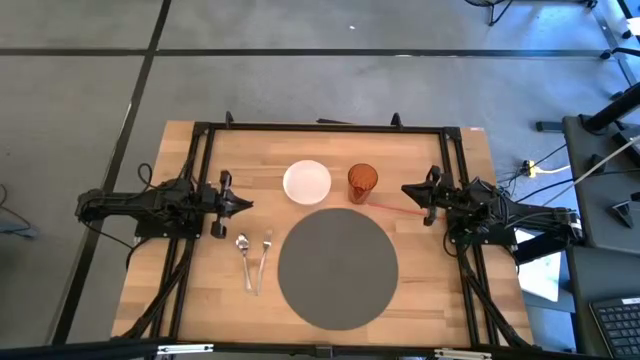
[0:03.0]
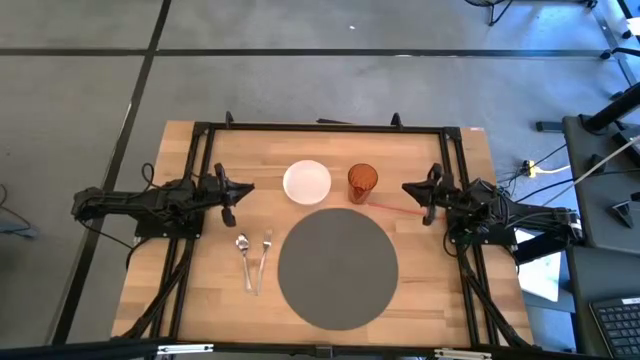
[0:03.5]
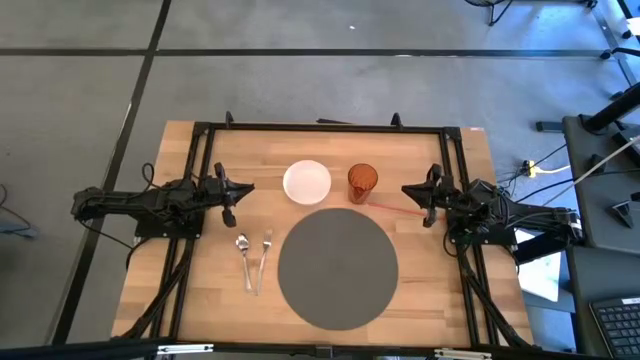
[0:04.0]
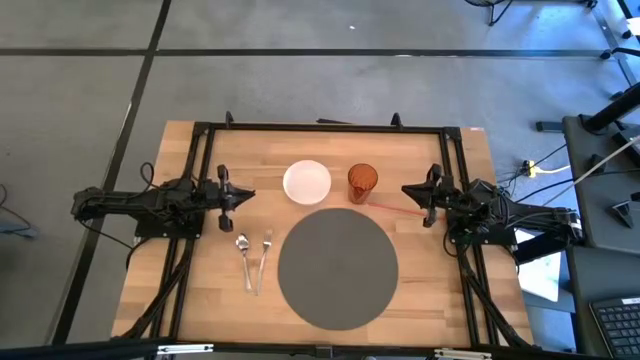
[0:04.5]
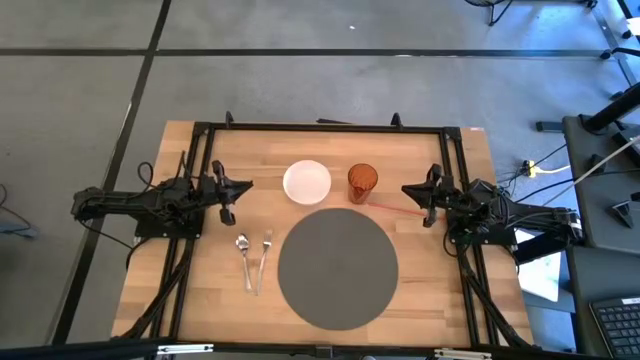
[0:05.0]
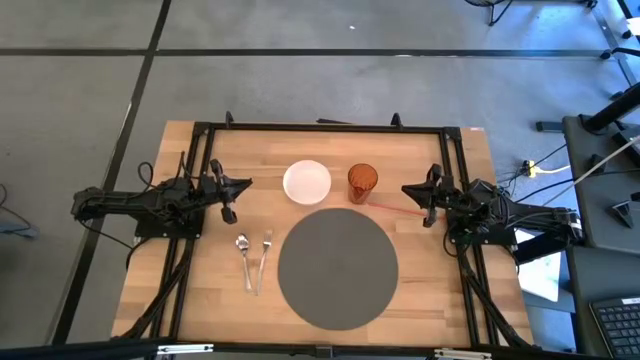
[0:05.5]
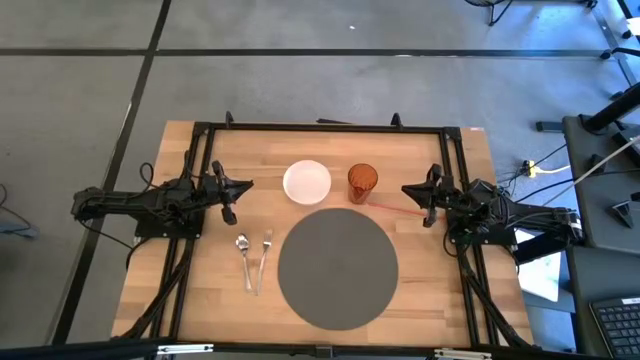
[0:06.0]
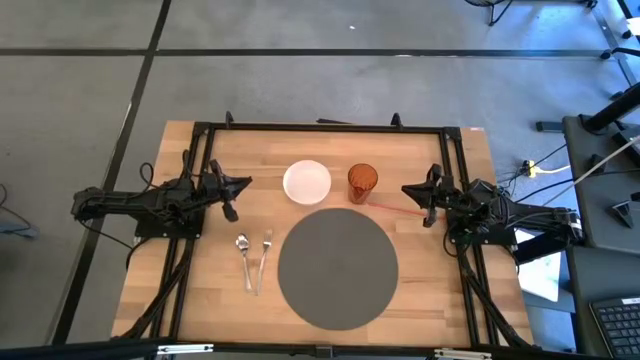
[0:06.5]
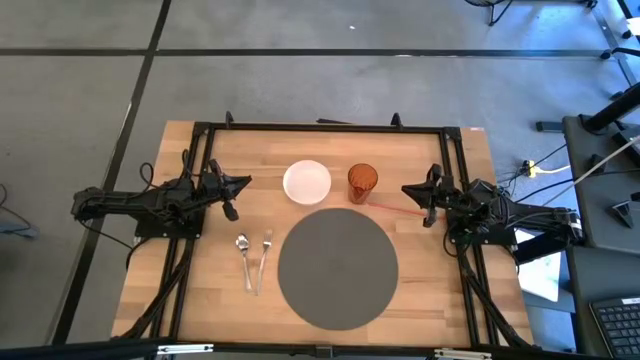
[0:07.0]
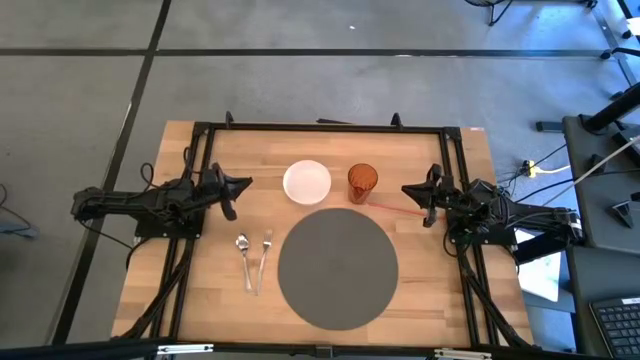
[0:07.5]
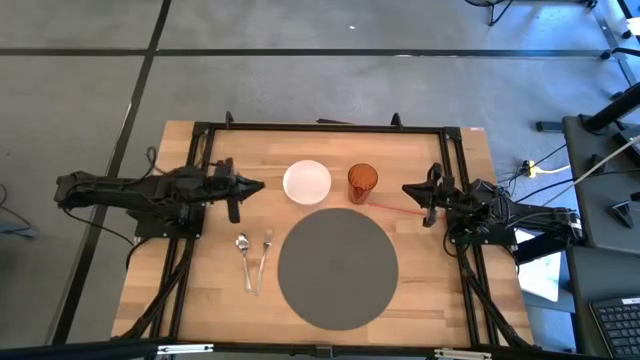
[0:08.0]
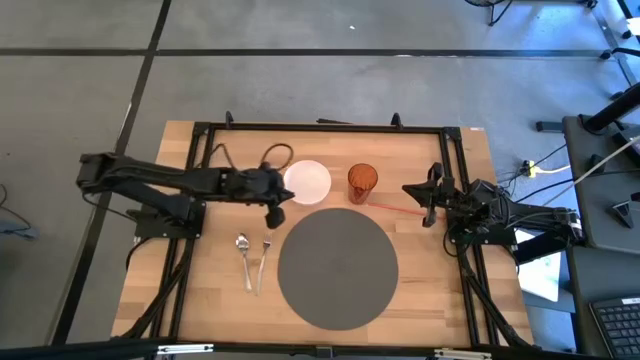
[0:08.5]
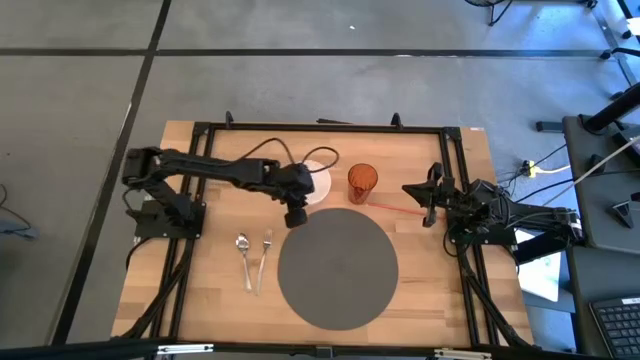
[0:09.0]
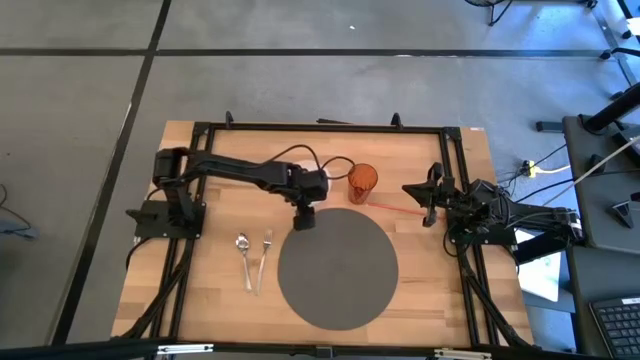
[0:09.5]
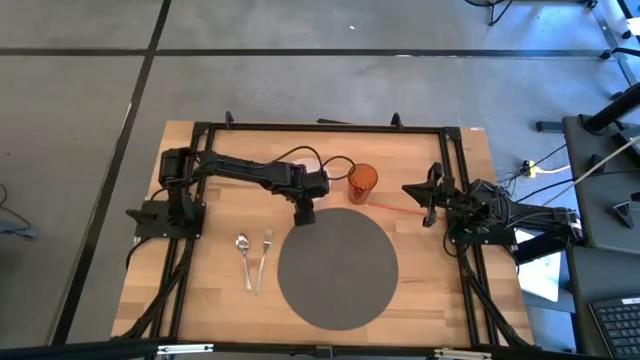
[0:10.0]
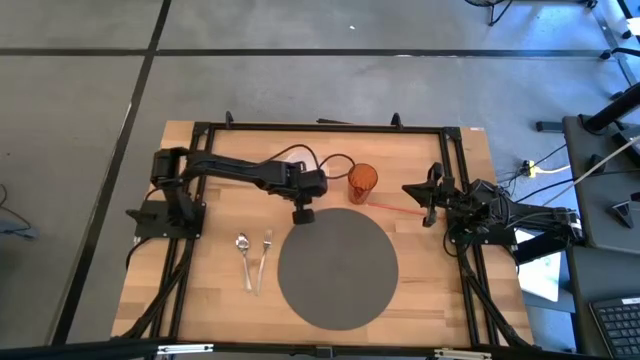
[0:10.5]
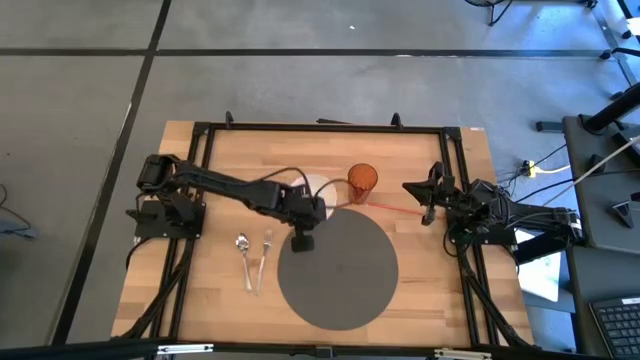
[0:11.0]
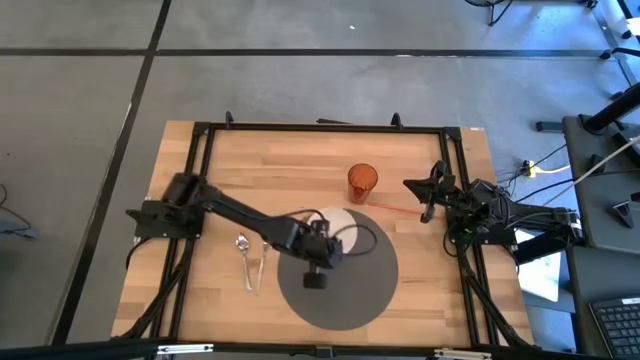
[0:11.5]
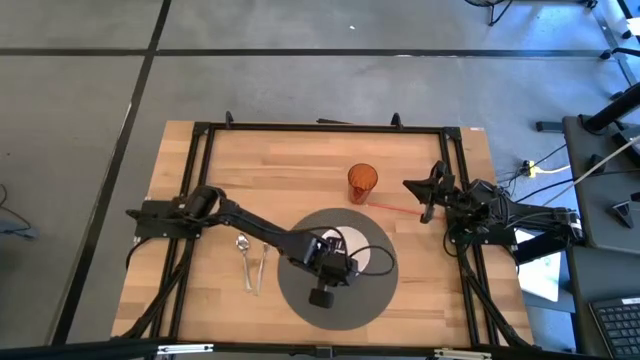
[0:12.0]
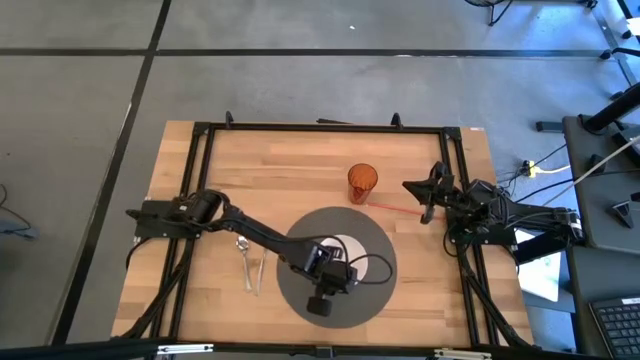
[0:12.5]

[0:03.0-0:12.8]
Task: Pick & Place Utensil
Put the white bowl to the center of the gray mat

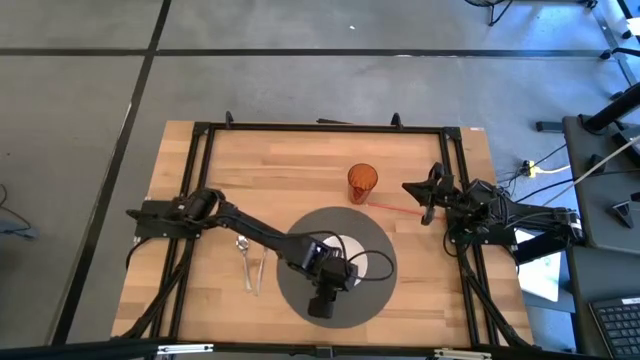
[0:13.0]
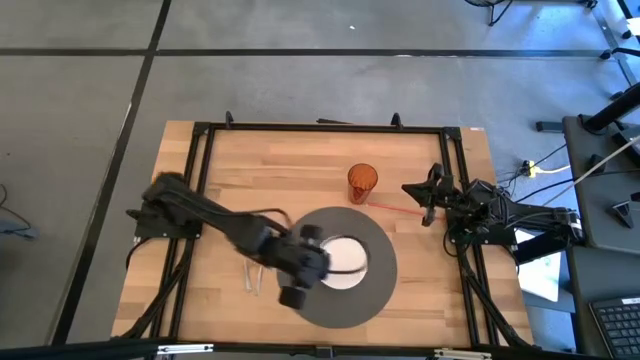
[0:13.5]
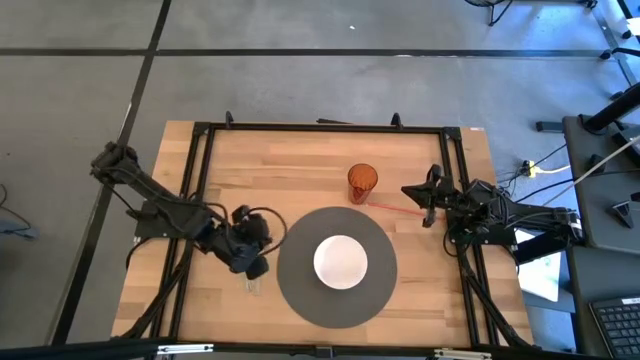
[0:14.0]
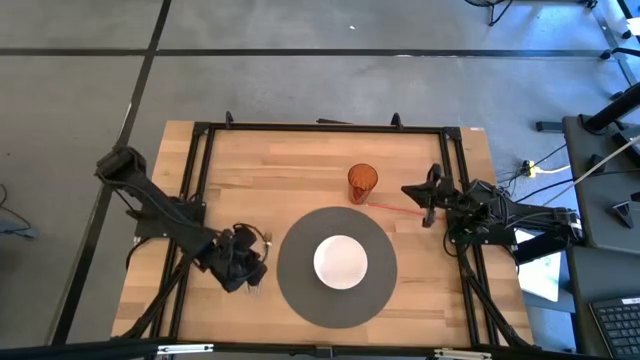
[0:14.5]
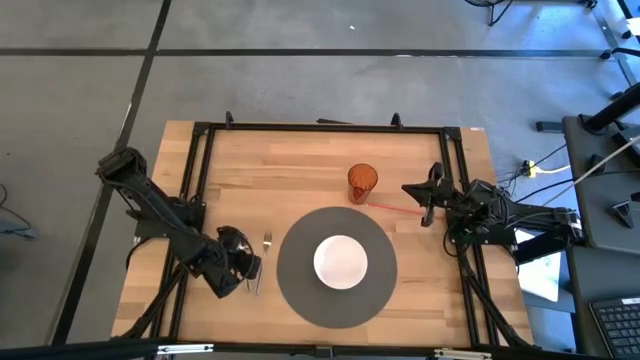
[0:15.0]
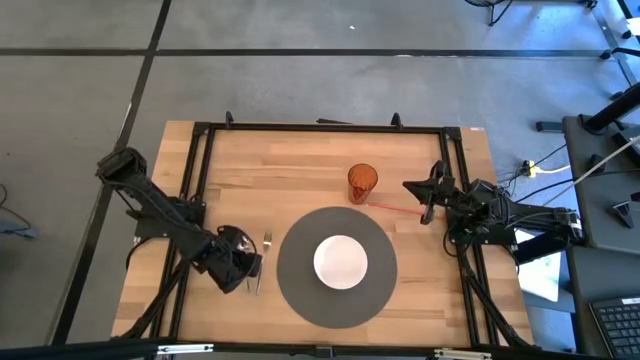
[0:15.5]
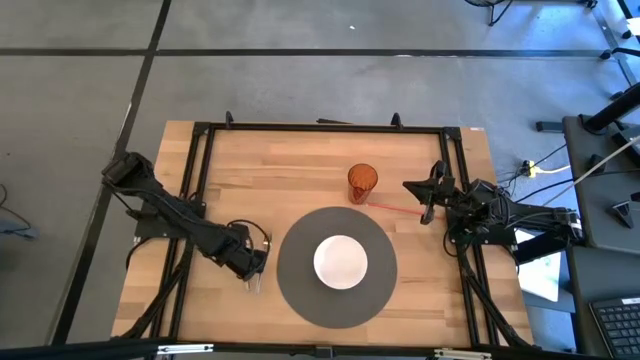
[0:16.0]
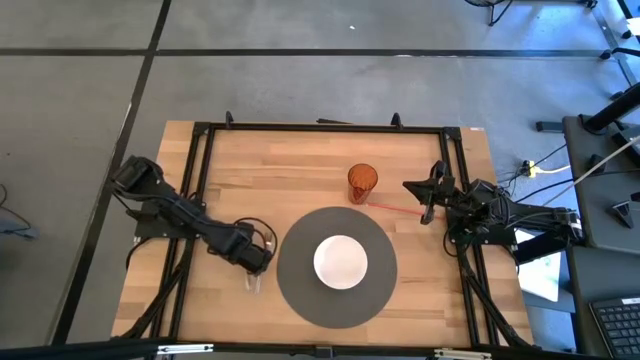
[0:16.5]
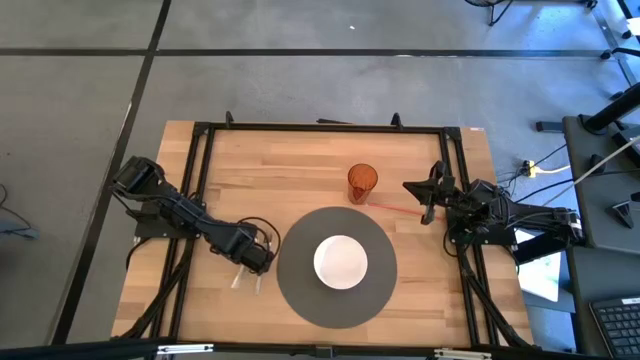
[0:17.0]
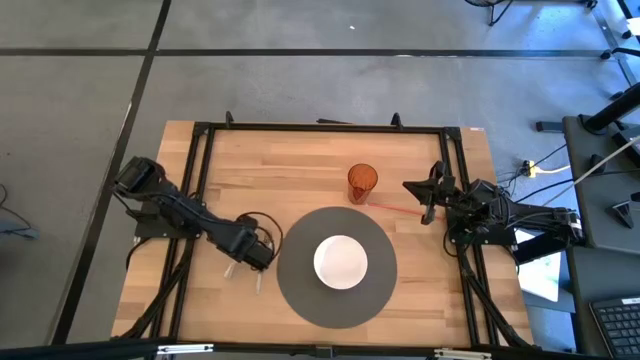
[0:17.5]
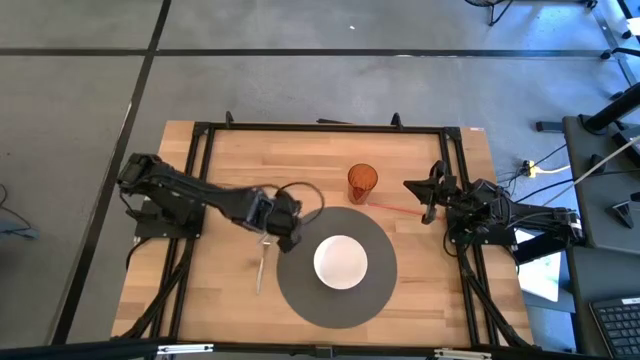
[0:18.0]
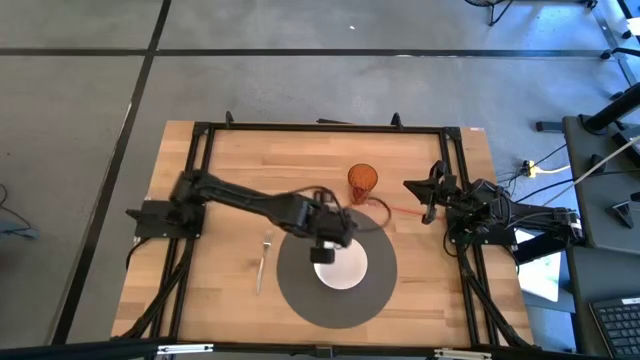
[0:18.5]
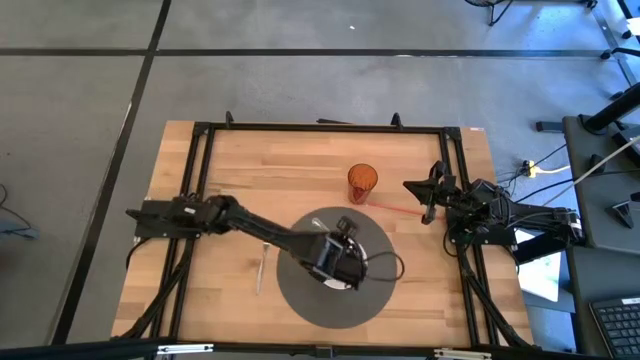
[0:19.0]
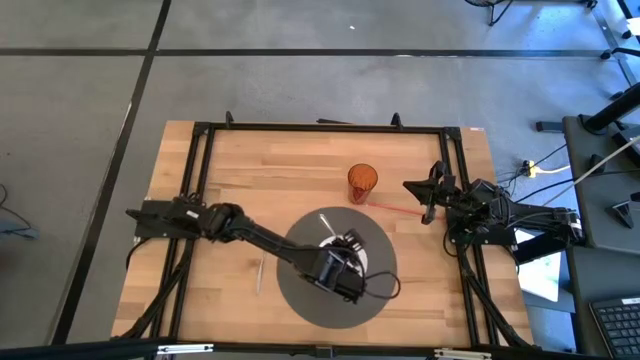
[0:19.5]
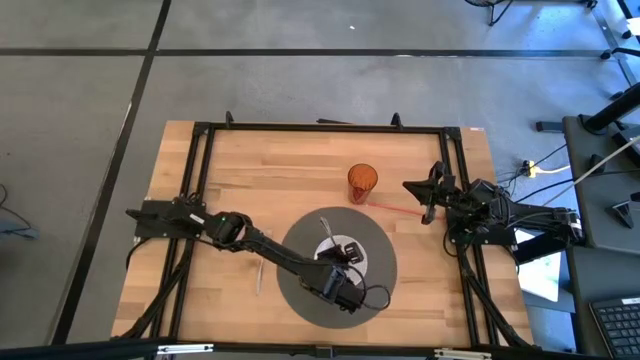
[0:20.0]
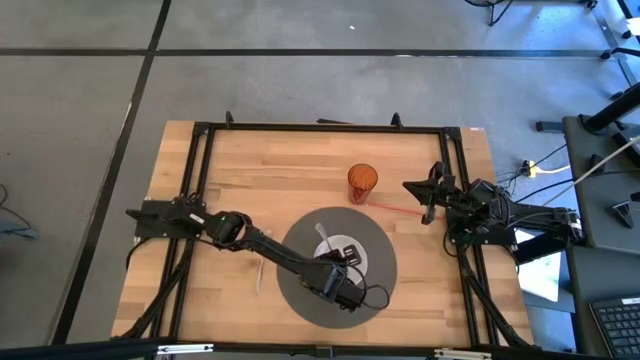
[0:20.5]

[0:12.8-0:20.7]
Put the silver spoon into the white bowl

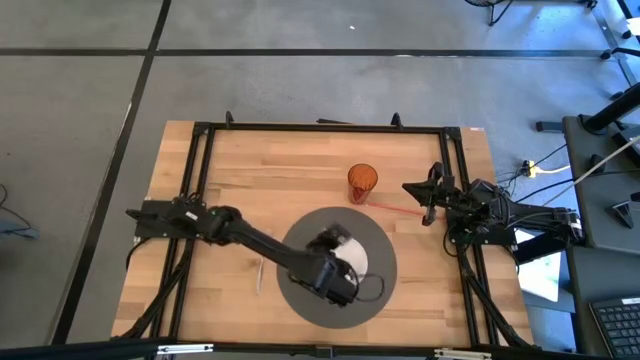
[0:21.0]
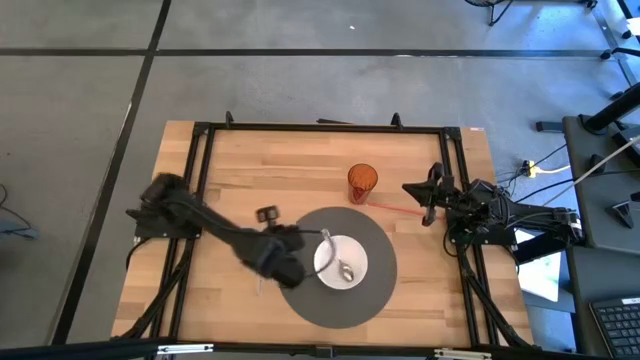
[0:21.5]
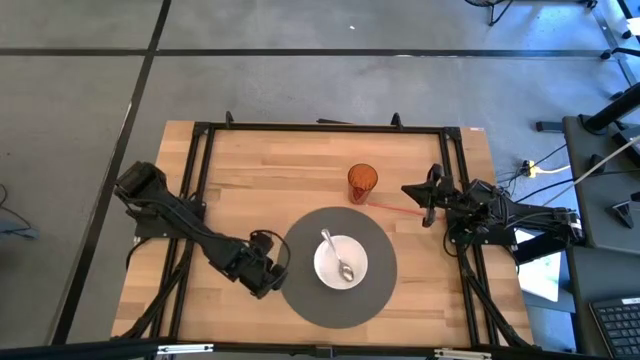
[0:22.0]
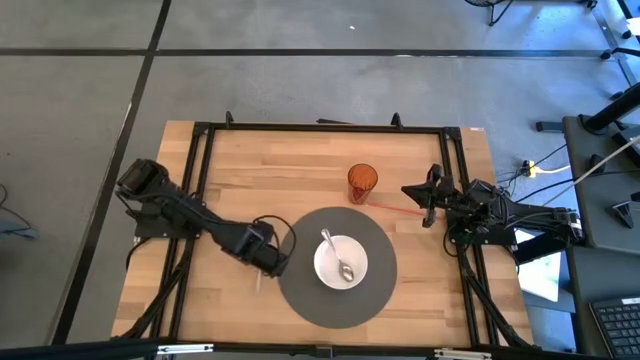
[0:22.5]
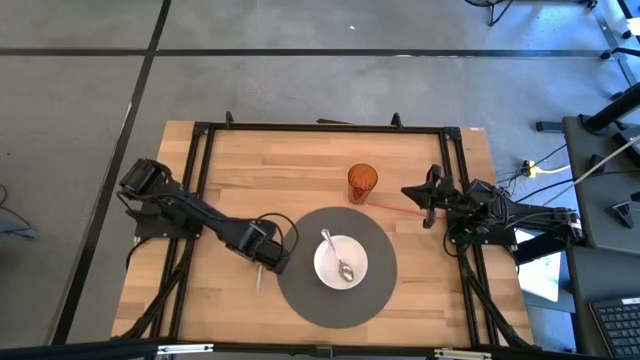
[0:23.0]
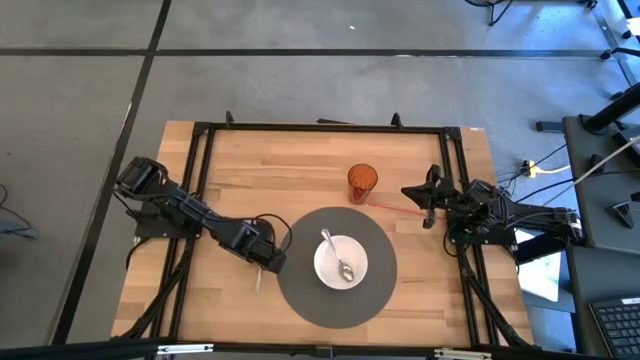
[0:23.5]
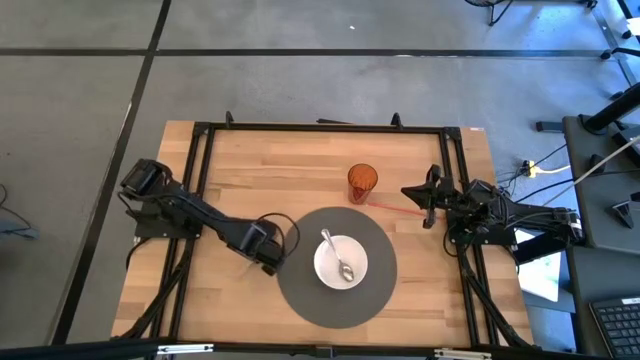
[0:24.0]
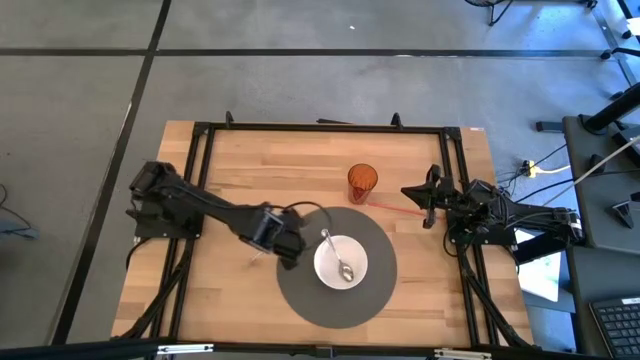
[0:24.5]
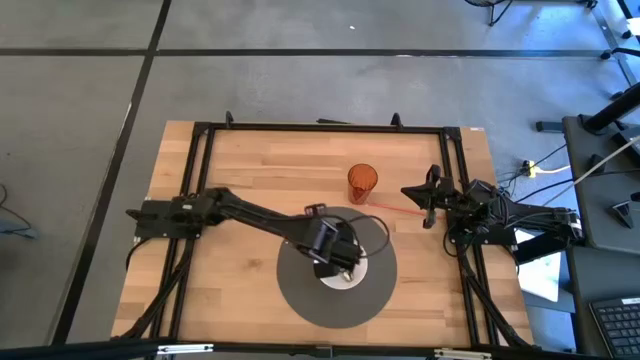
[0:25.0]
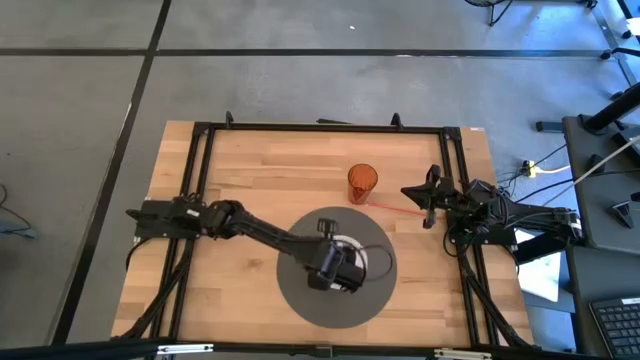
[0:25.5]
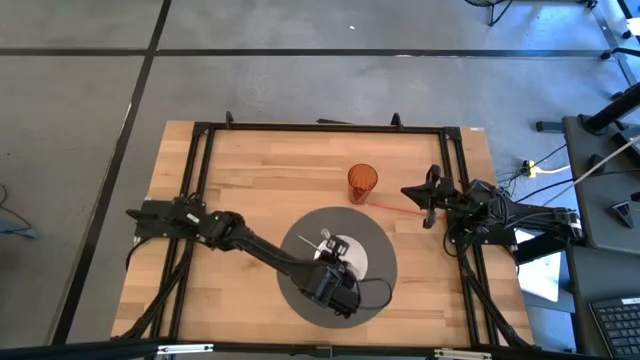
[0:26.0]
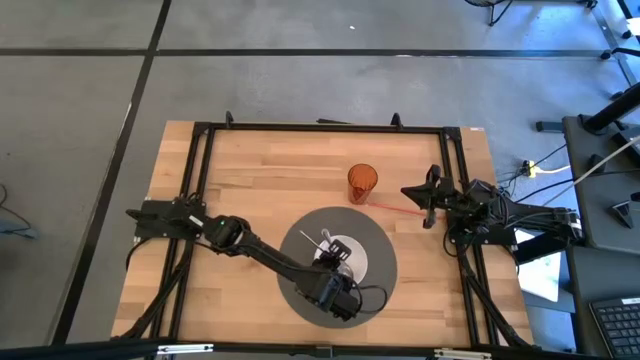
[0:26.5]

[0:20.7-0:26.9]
Put the silver fork into the white bowl
